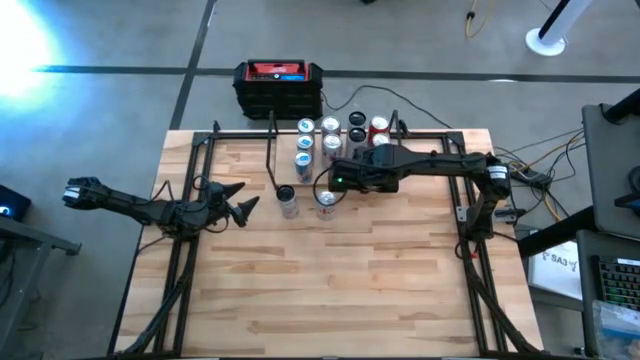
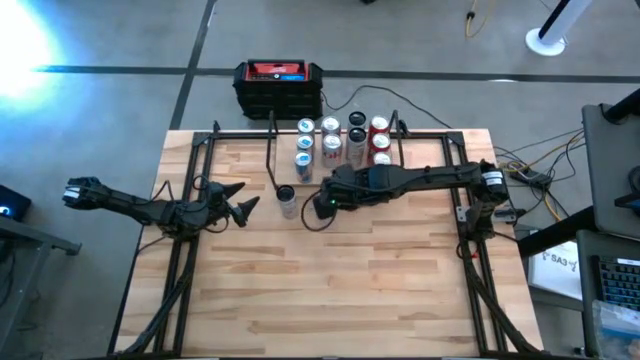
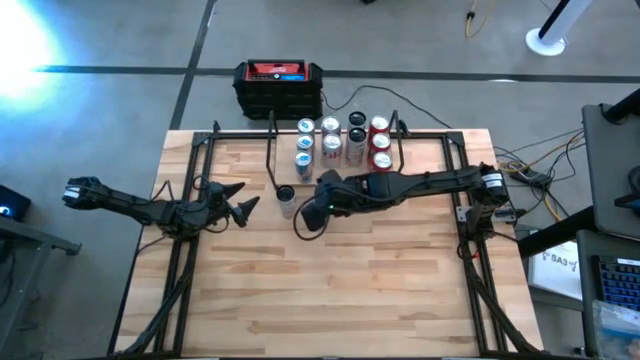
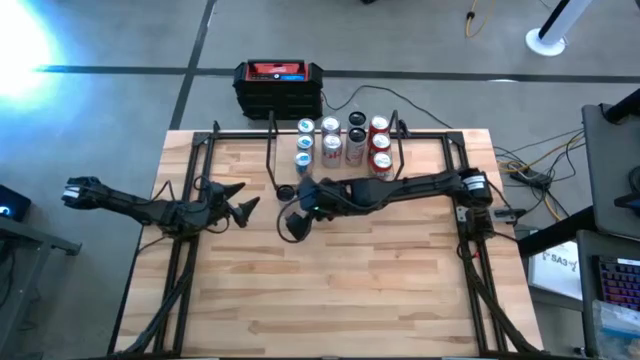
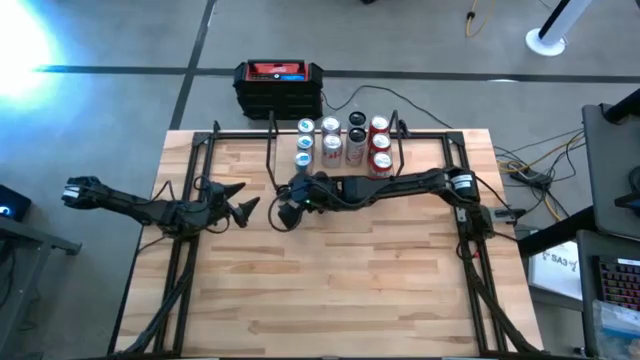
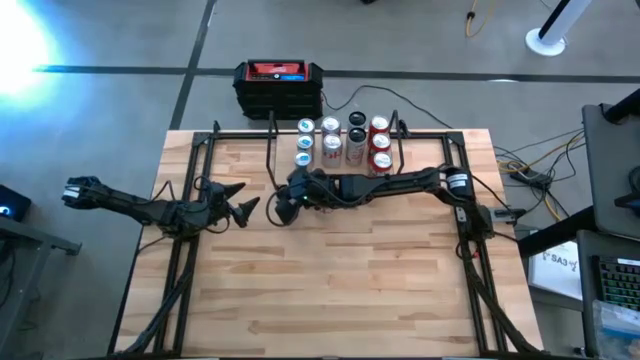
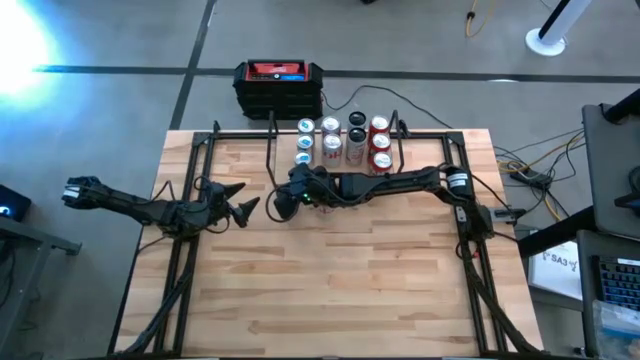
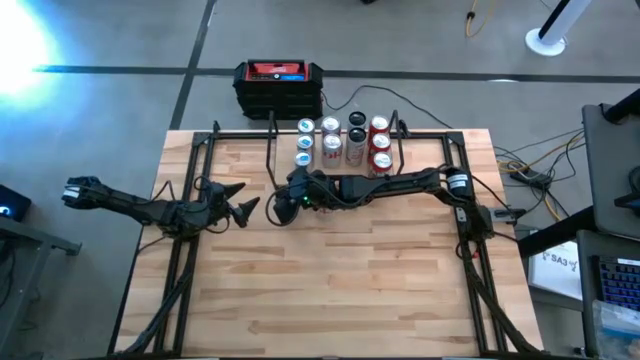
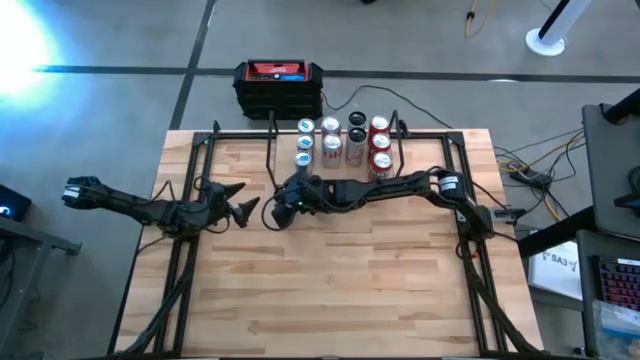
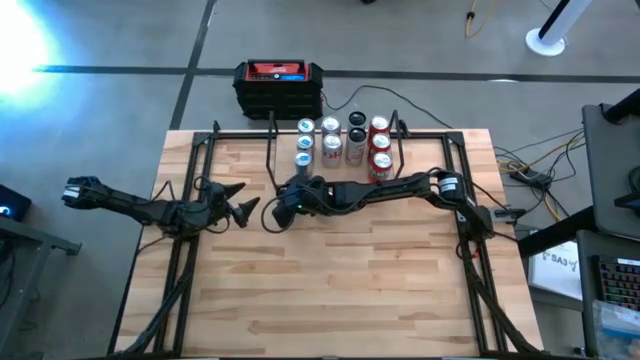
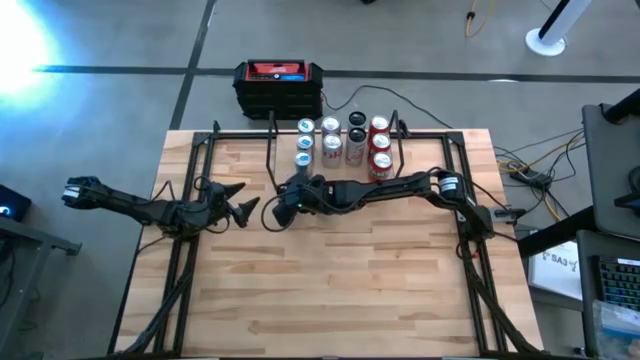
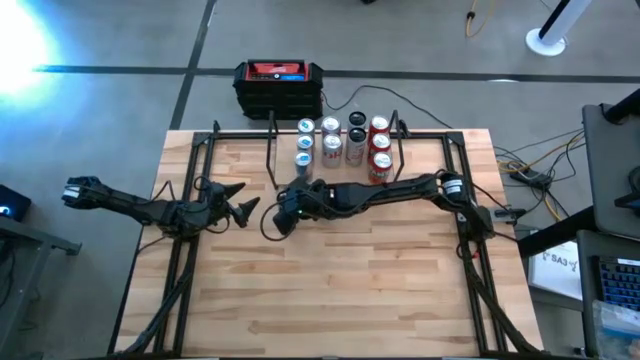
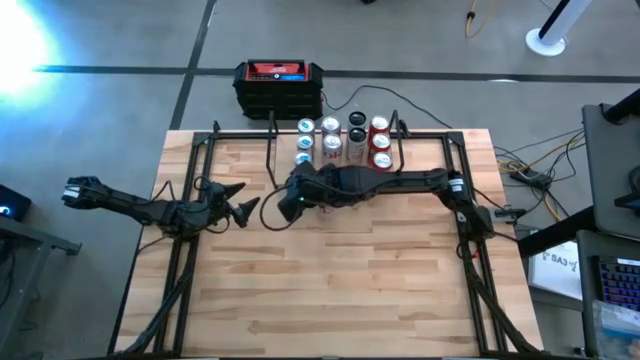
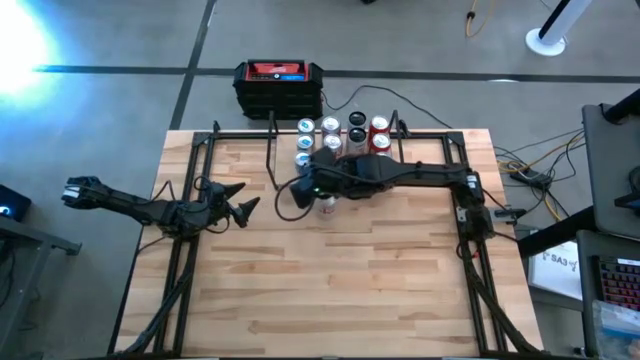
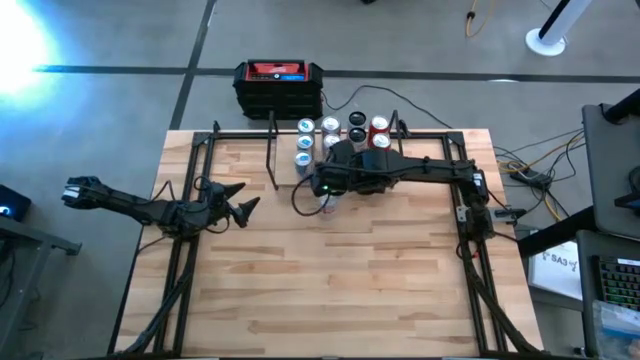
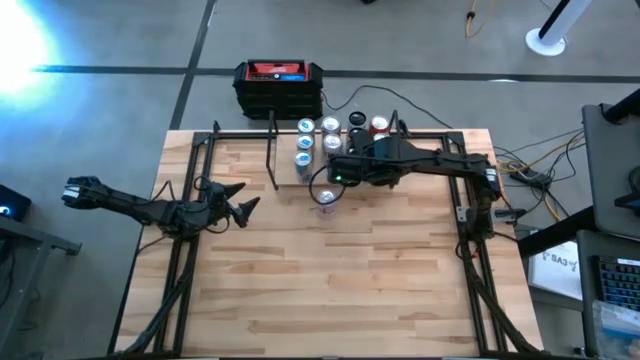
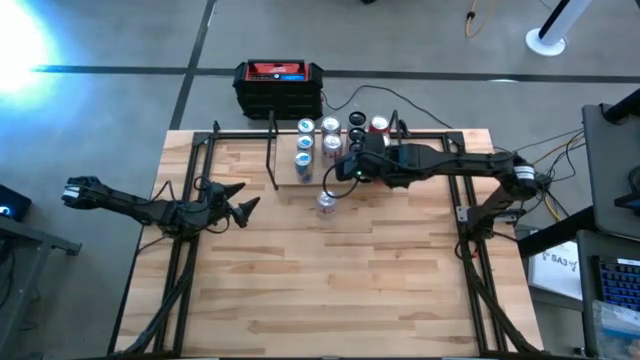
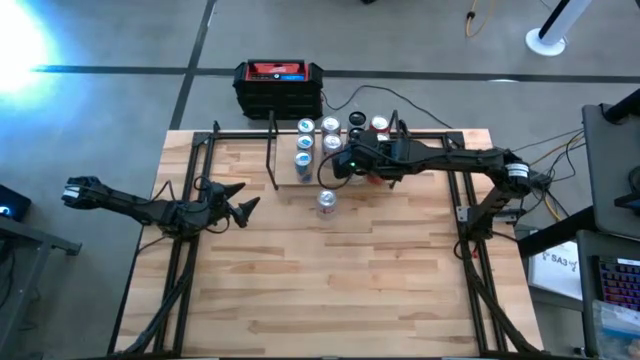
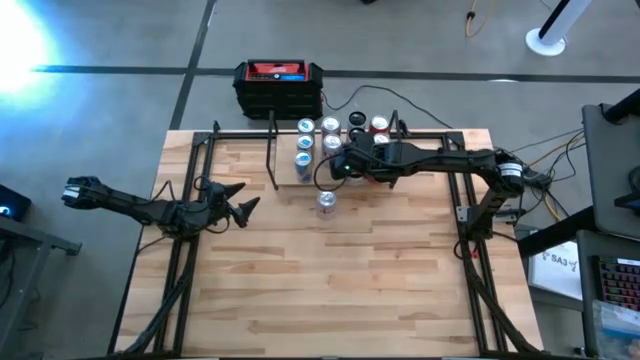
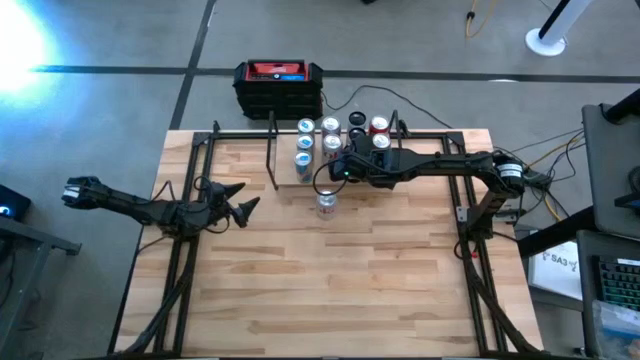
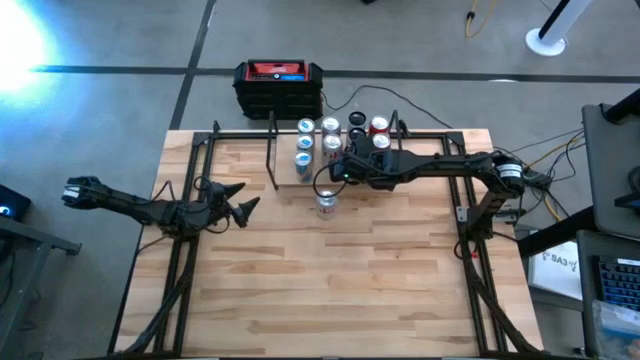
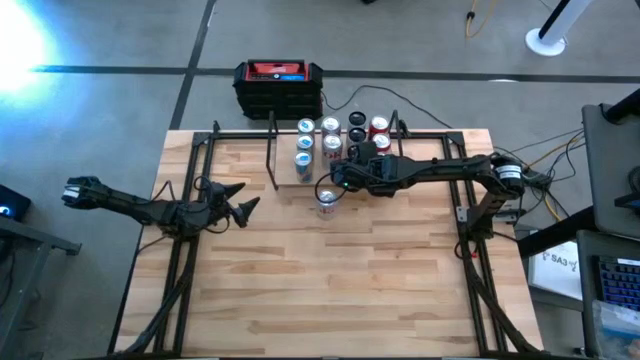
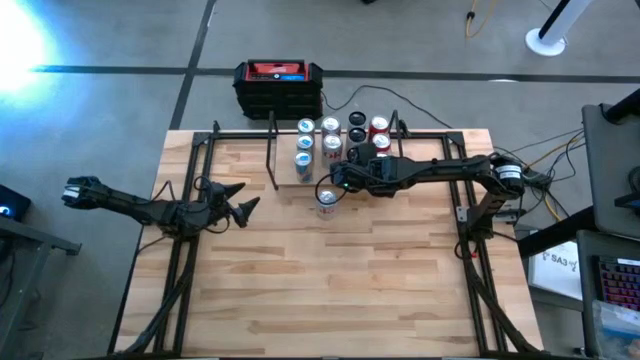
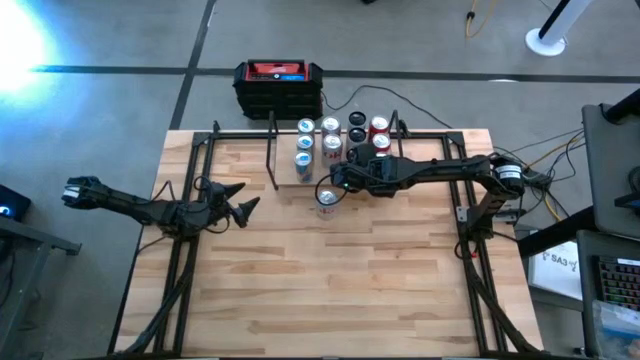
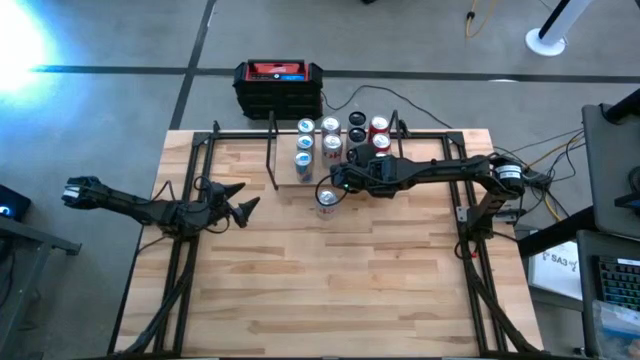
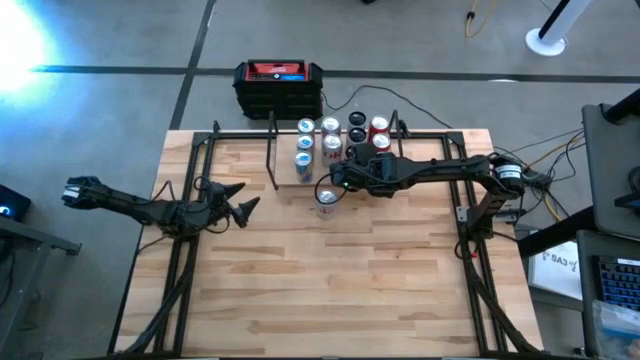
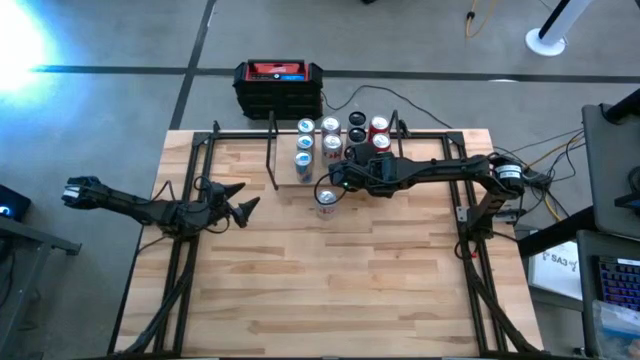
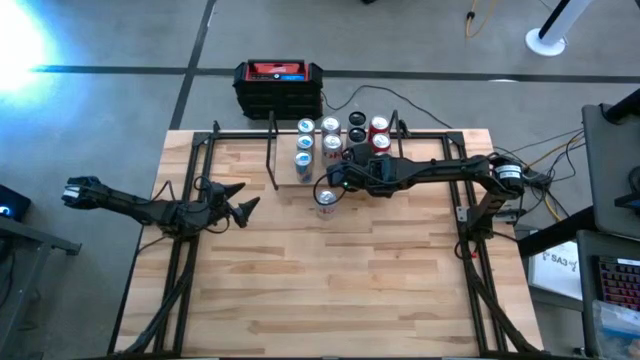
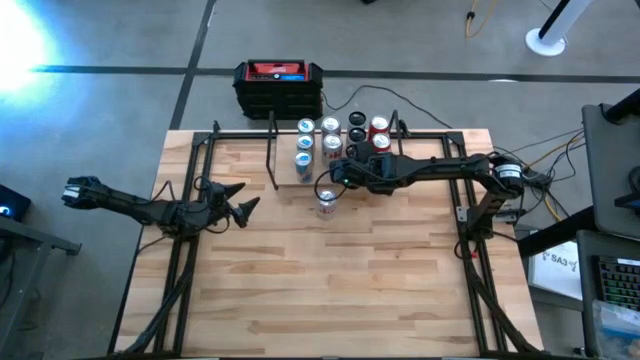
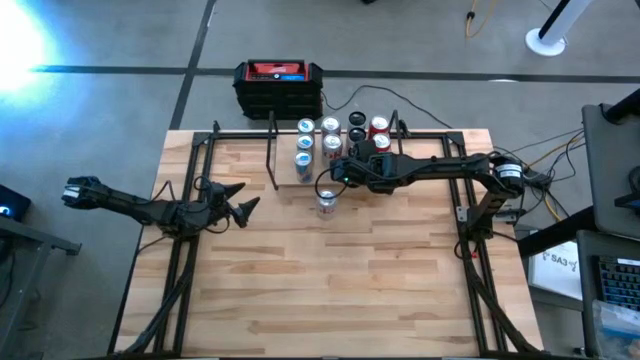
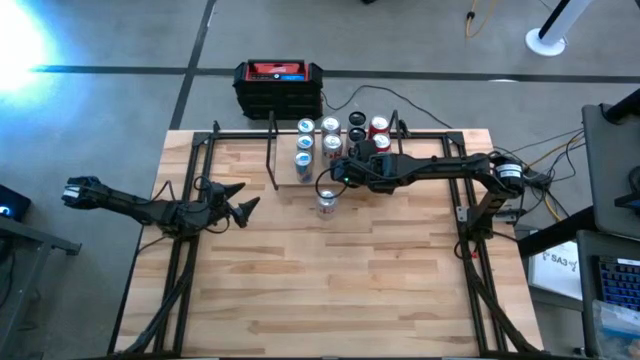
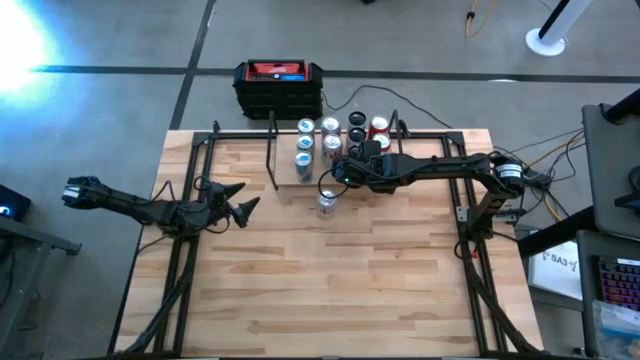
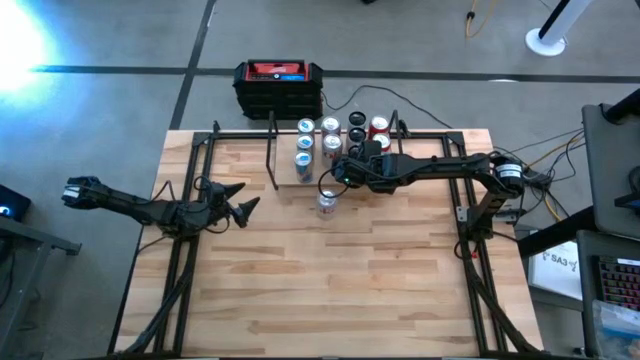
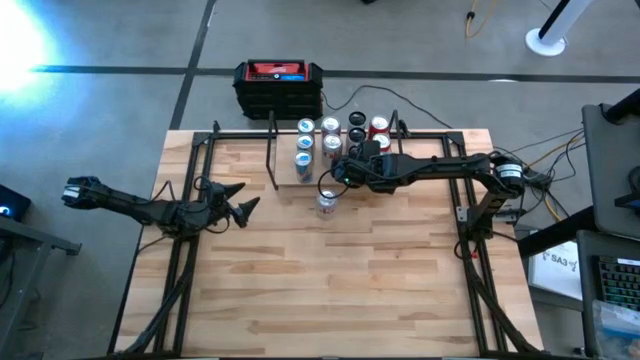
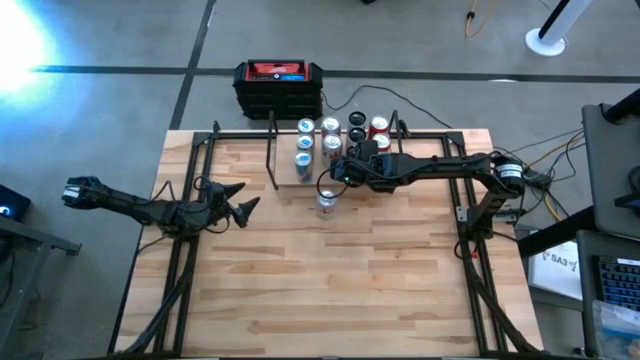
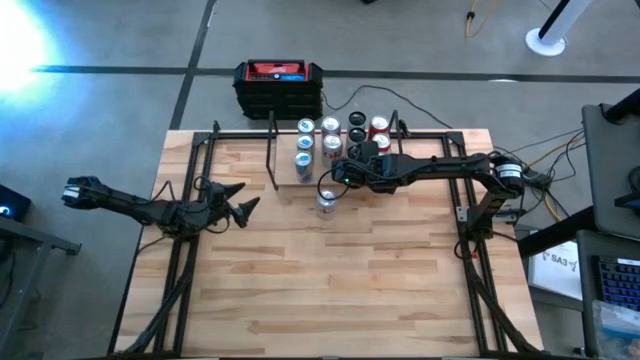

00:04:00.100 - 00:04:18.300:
Task: Place canned beverage on shelf
Put the white pink soda can on the shelf aligned with the other white pink soda can

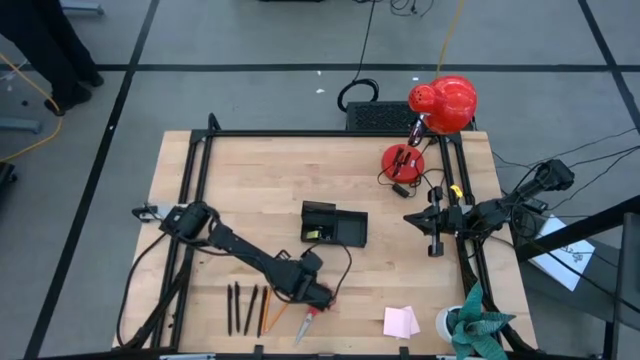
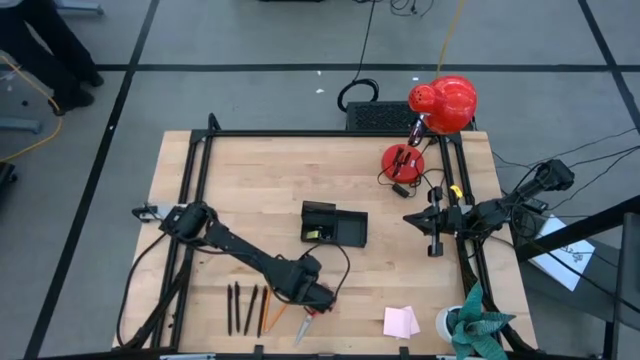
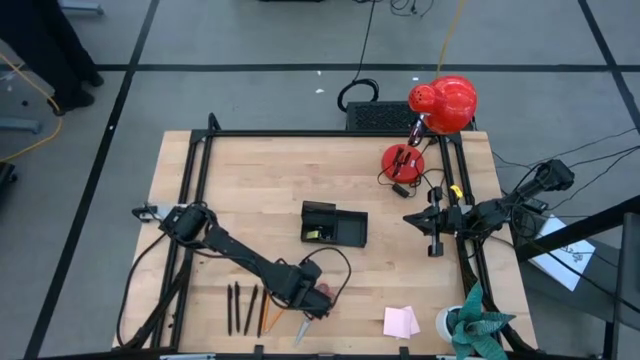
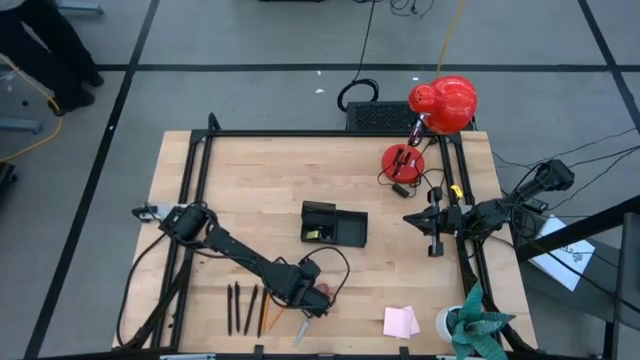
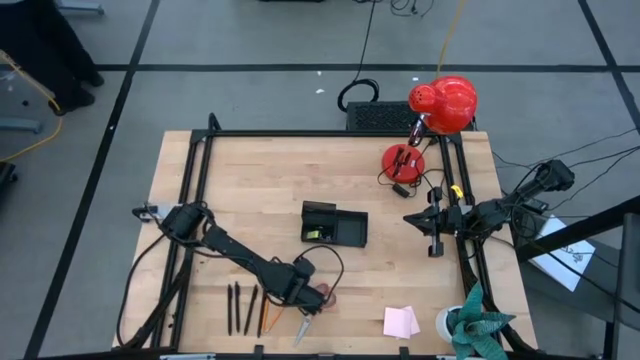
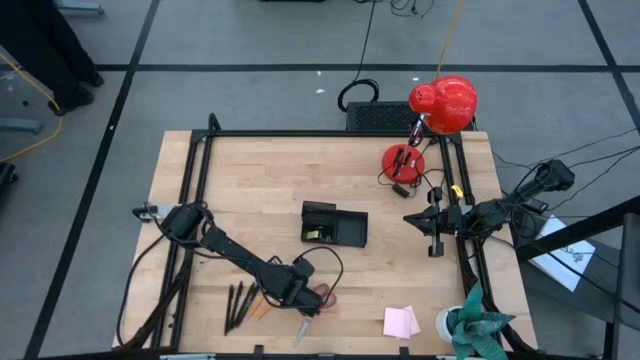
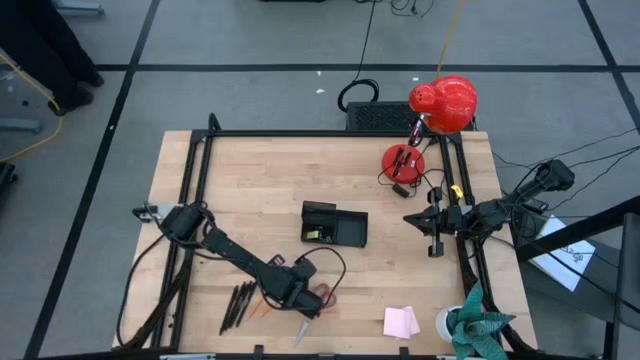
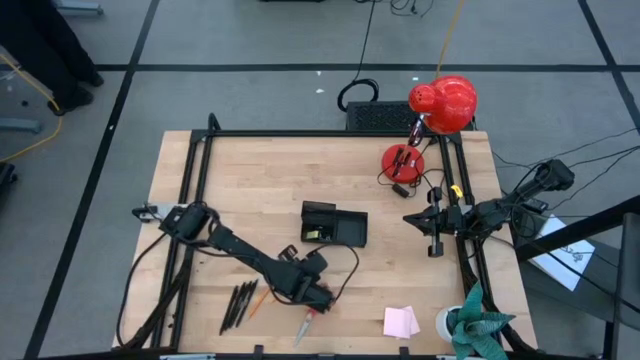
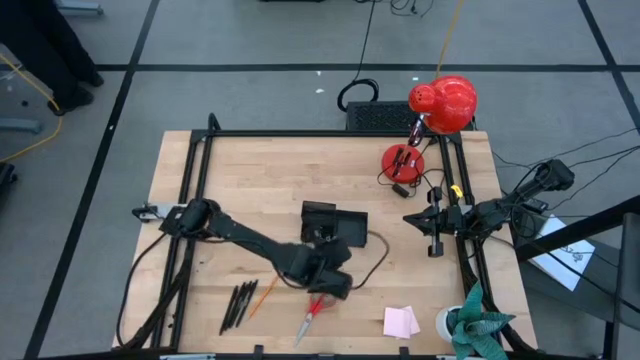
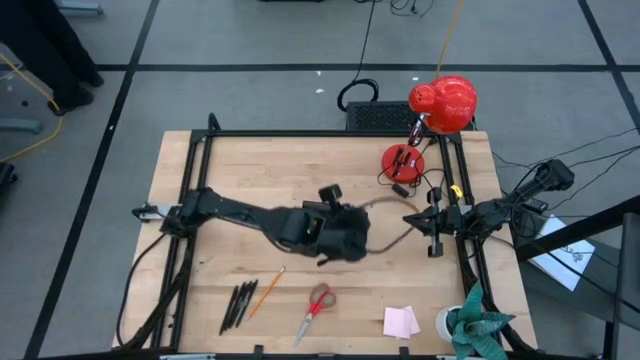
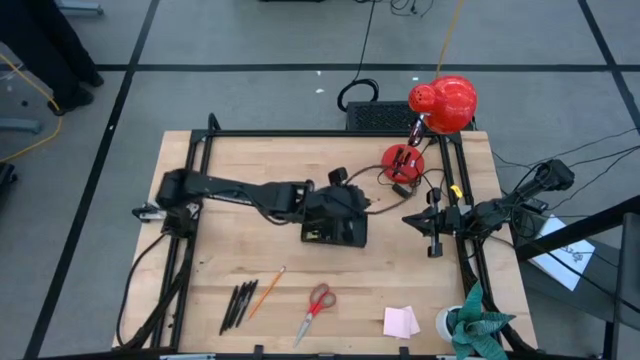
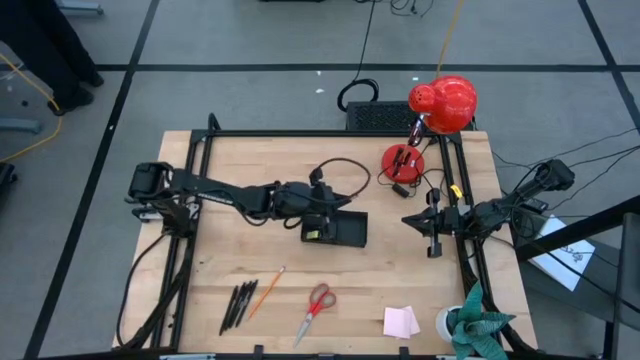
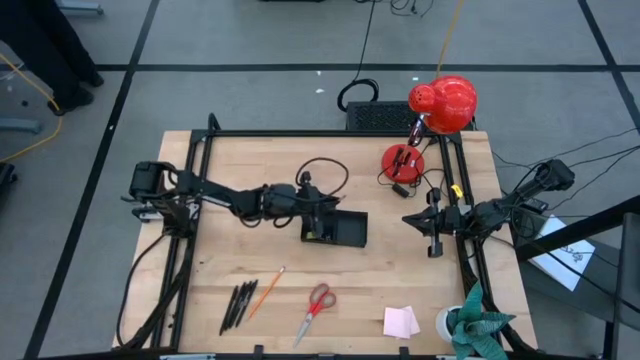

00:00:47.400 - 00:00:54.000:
Task: Pick and place office supplies into organizer
Put the right pencil into the desk organizer
